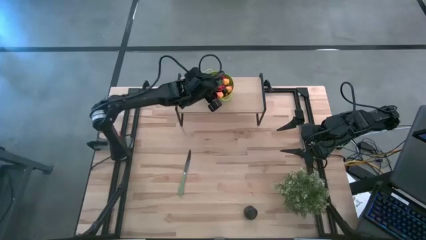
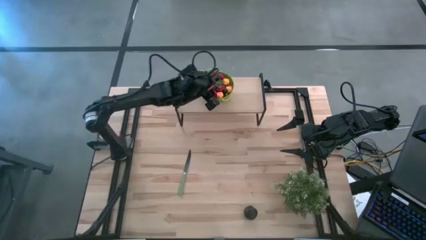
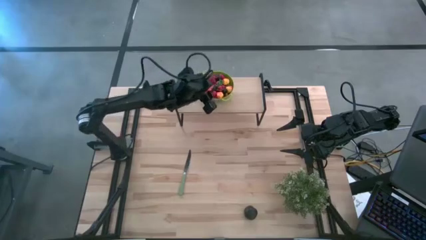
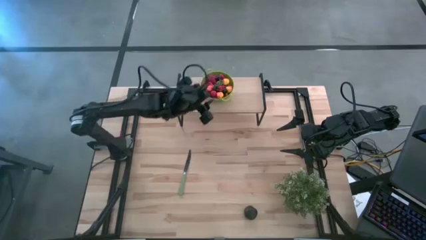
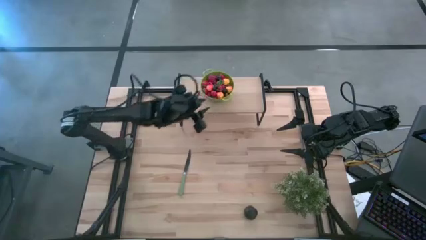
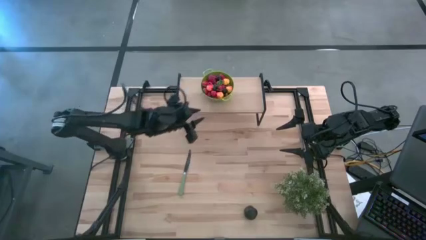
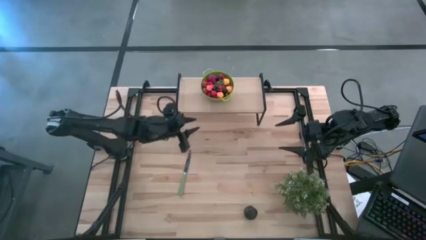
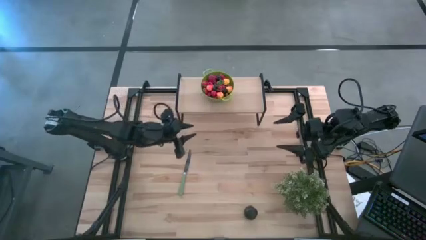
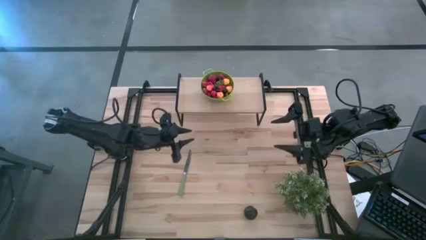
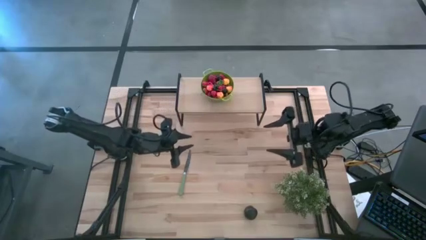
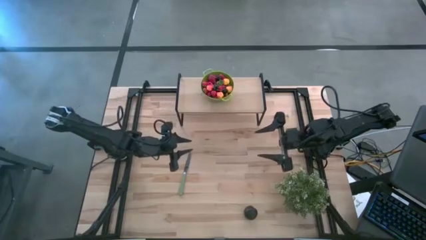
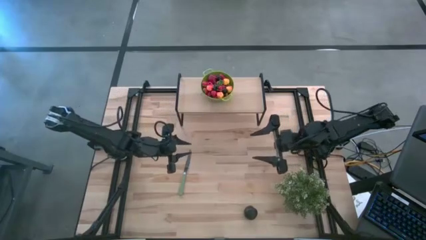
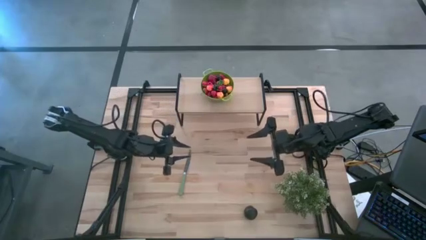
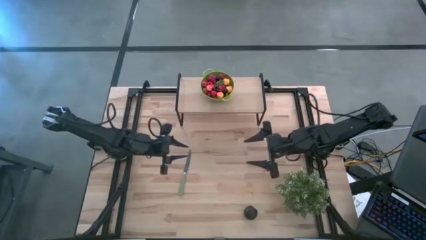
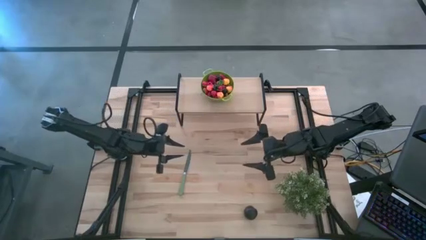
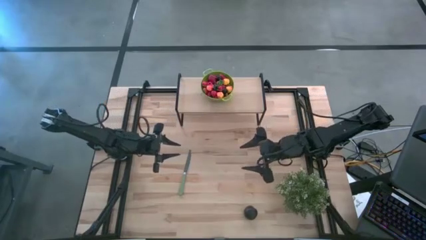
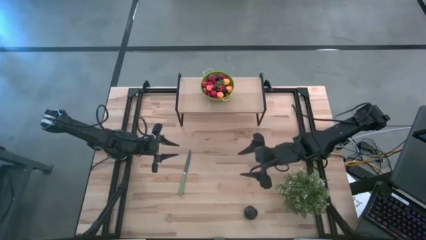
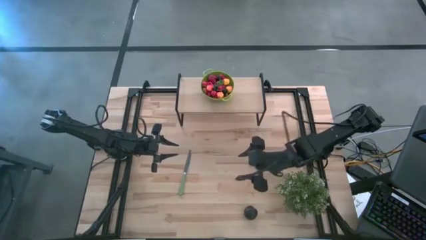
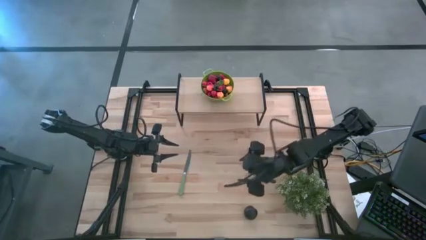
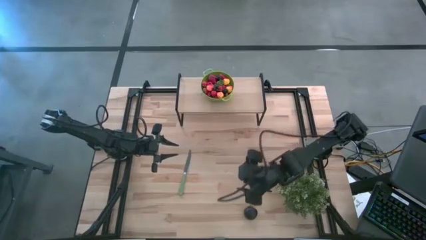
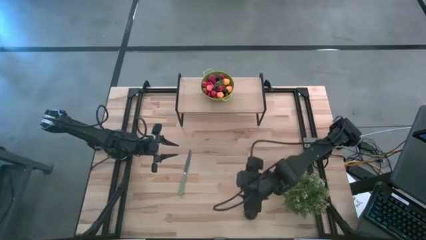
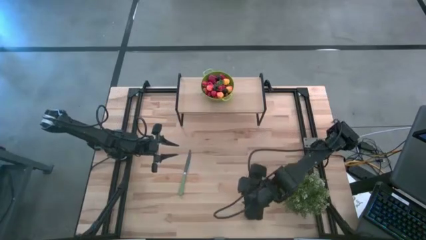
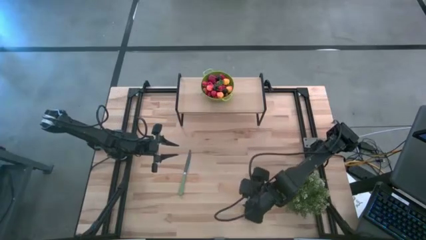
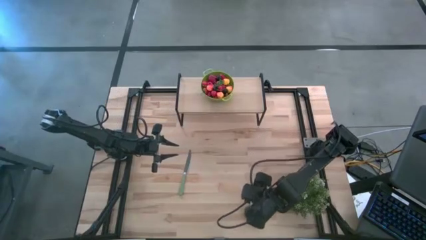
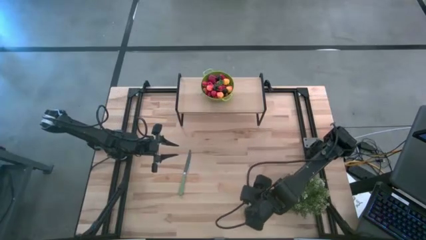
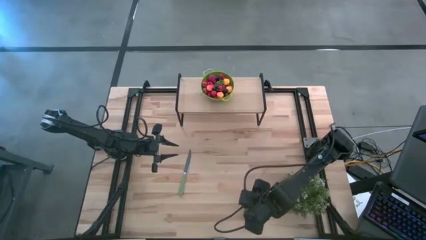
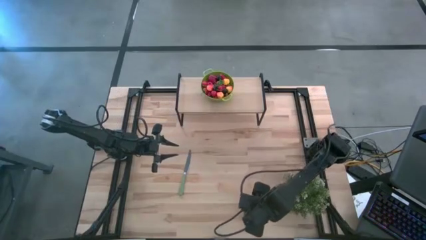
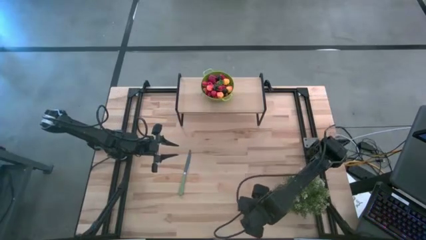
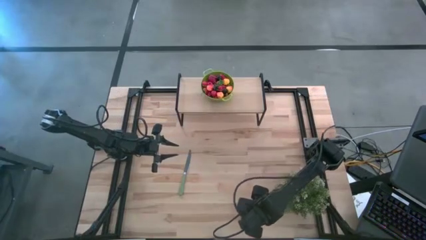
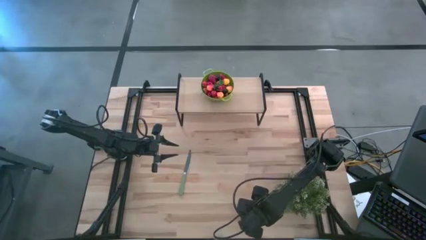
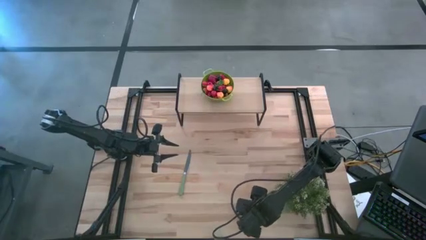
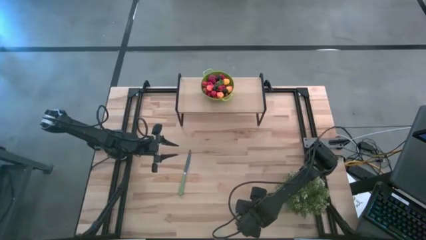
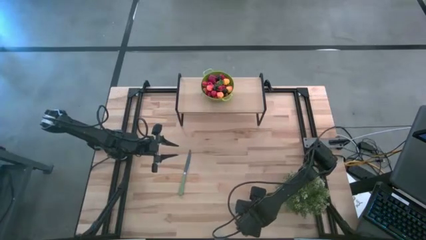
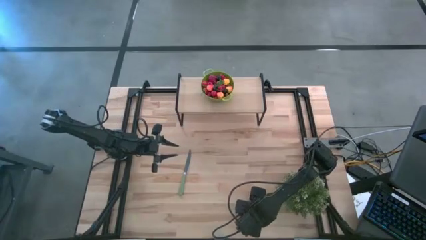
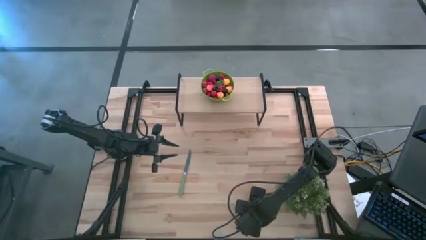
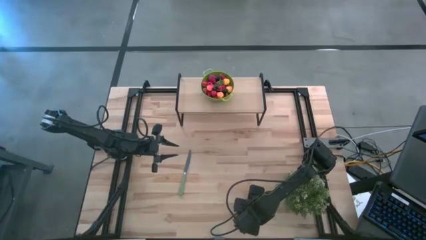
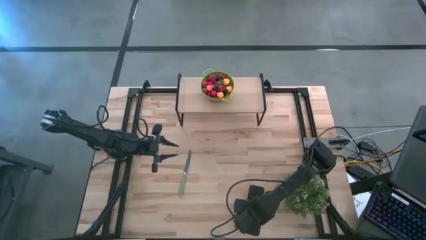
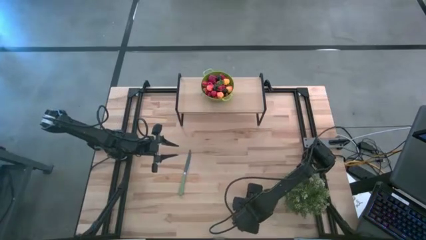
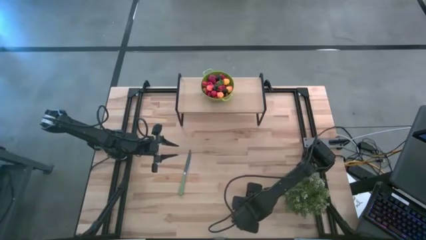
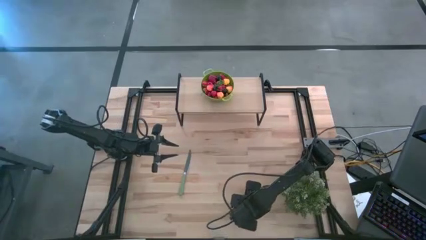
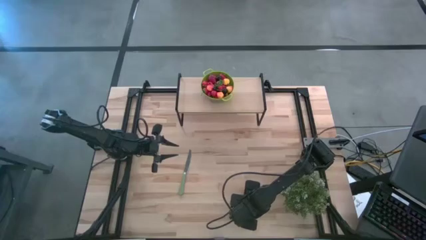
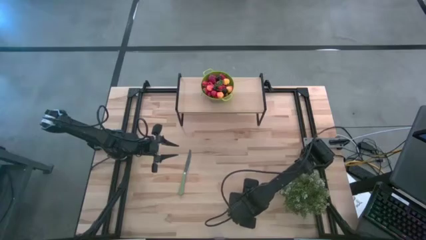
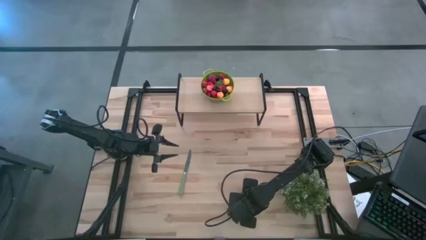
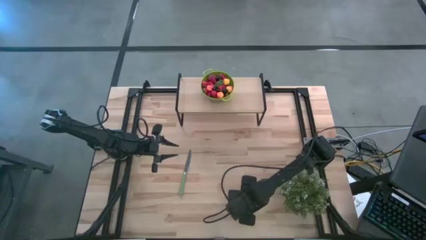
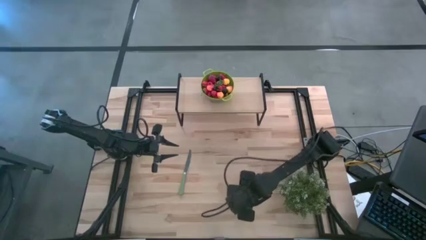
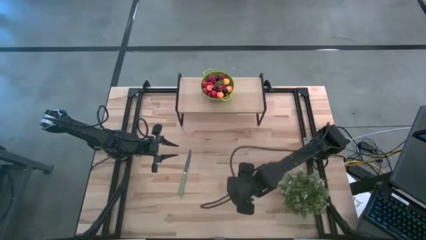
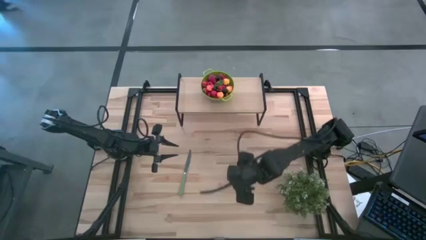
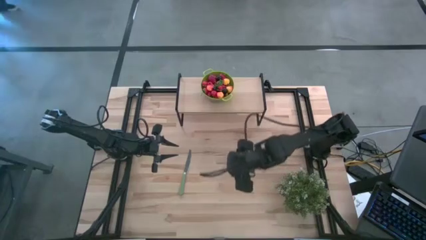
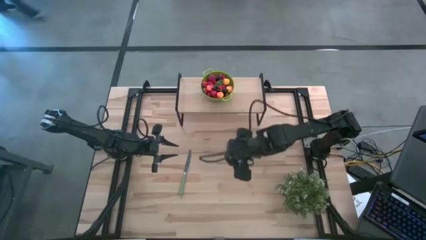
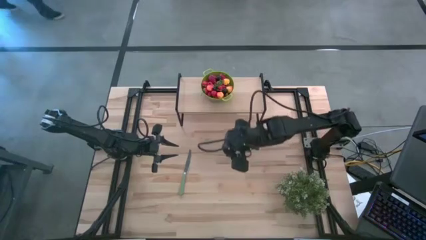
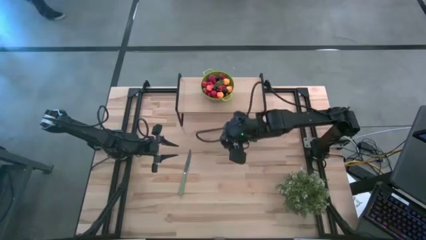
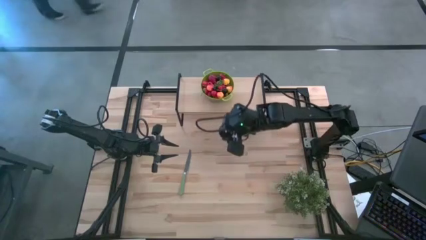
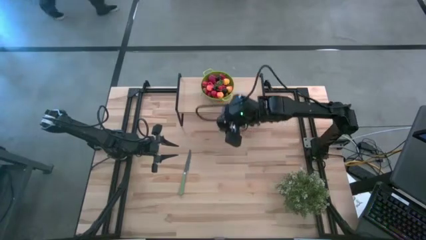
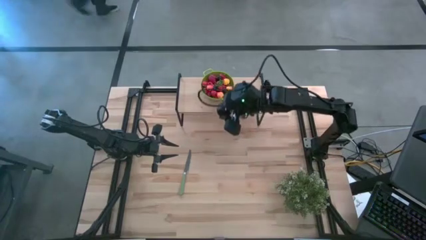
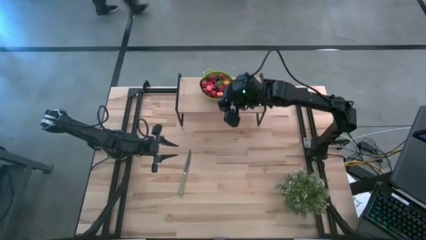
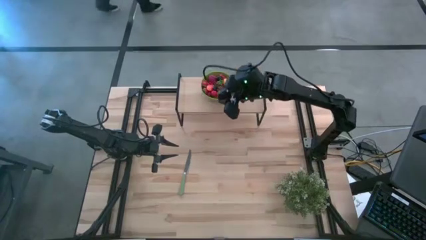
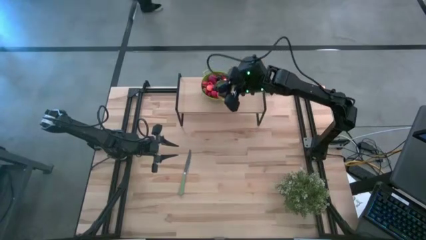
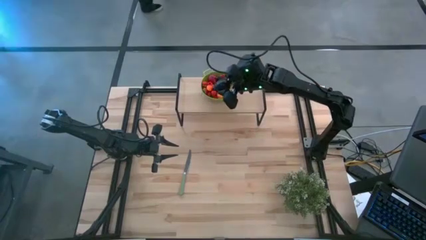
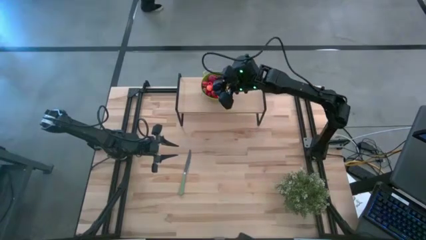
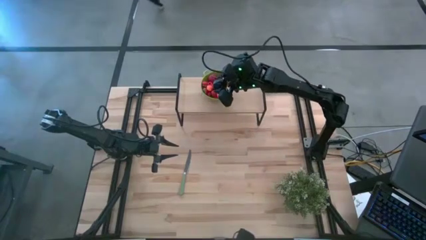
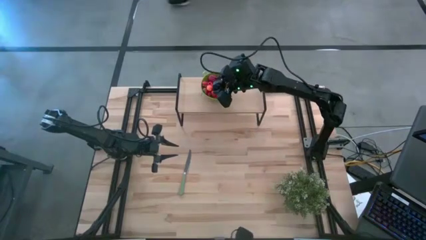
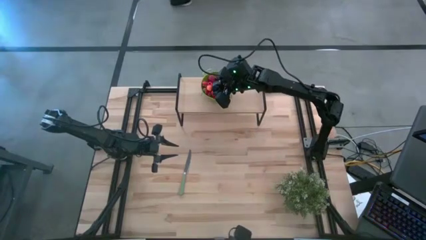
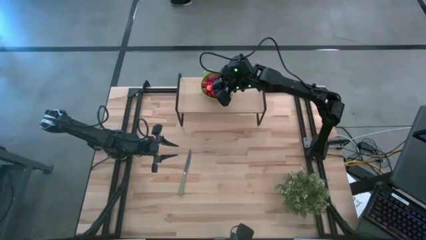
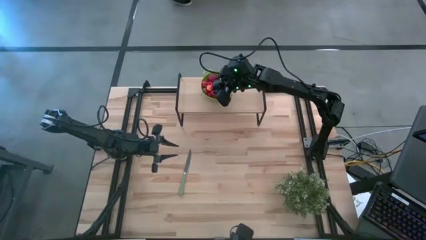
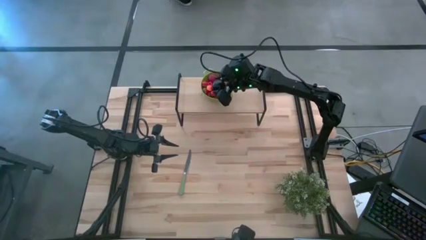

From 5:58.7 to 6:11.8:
Task: Pick & Place Fruit
Put the plum into the green colander on the shelf
